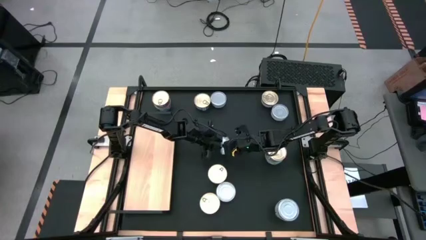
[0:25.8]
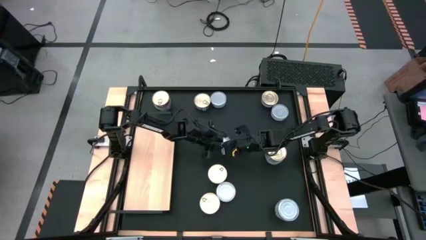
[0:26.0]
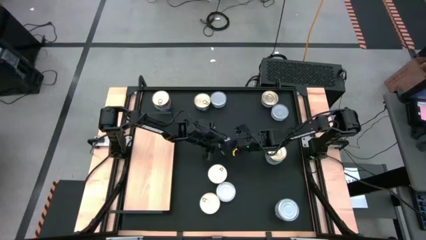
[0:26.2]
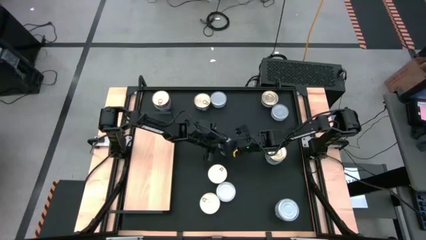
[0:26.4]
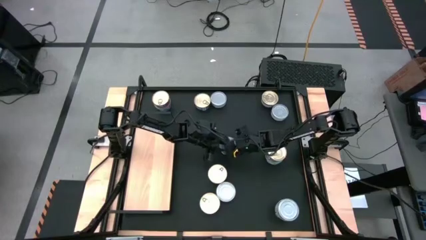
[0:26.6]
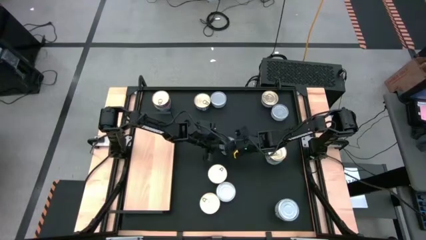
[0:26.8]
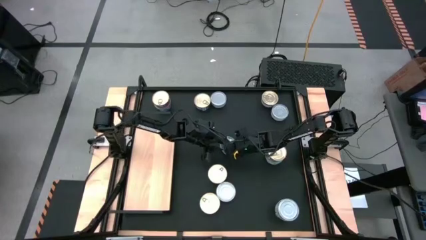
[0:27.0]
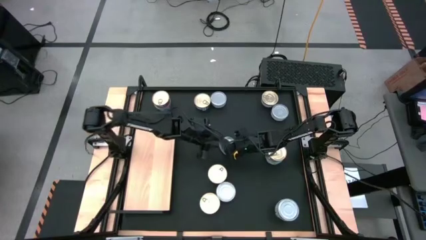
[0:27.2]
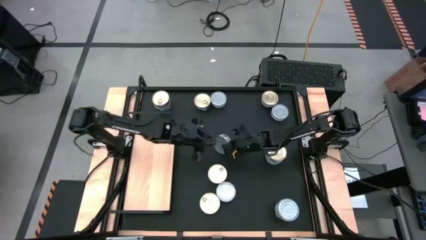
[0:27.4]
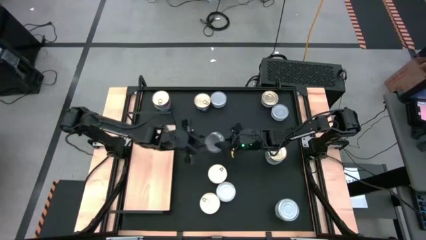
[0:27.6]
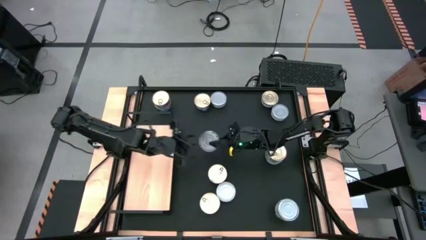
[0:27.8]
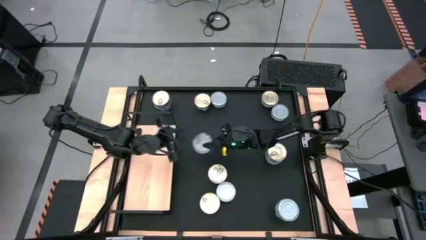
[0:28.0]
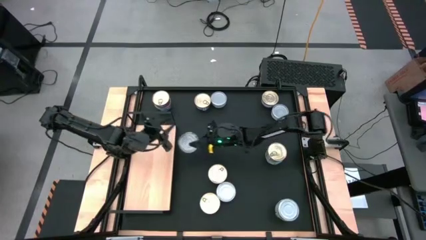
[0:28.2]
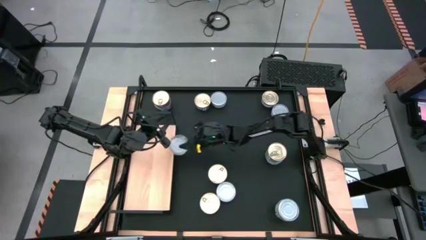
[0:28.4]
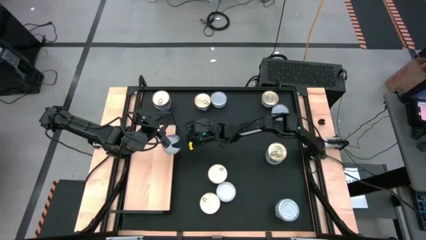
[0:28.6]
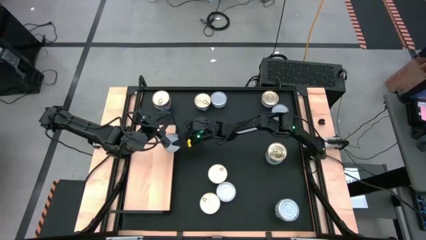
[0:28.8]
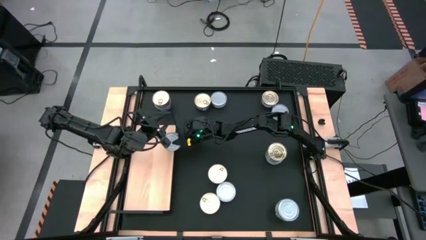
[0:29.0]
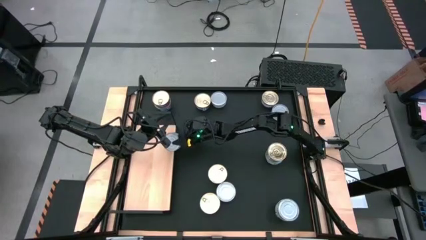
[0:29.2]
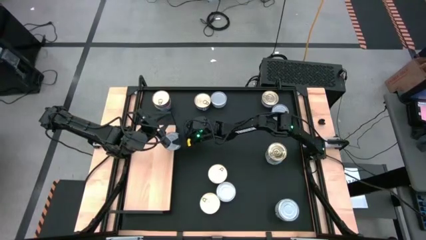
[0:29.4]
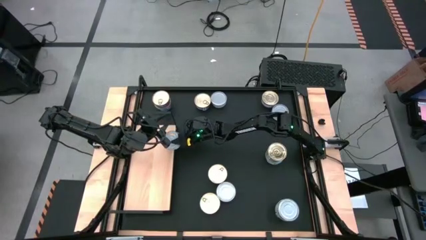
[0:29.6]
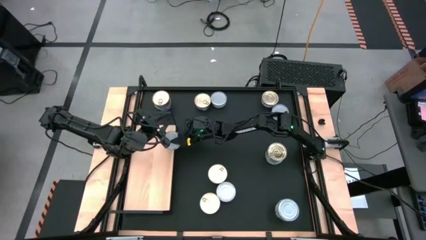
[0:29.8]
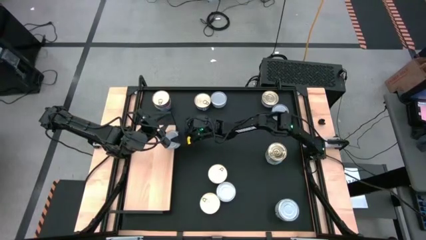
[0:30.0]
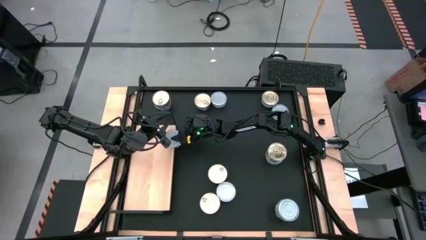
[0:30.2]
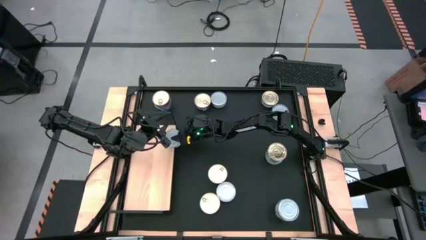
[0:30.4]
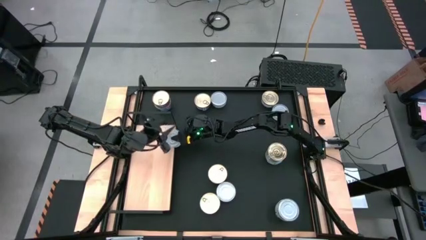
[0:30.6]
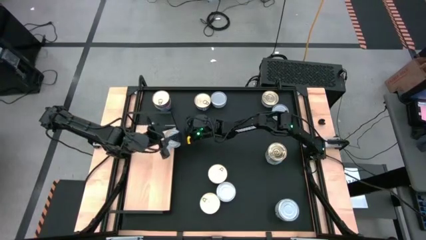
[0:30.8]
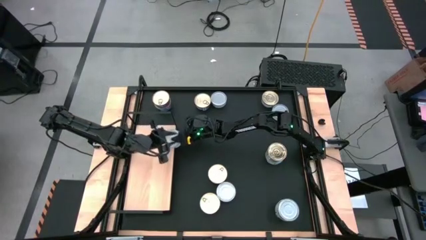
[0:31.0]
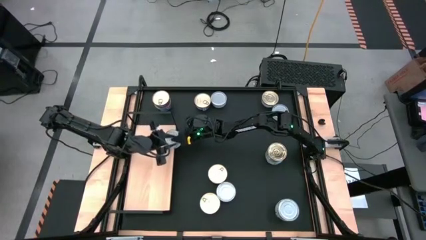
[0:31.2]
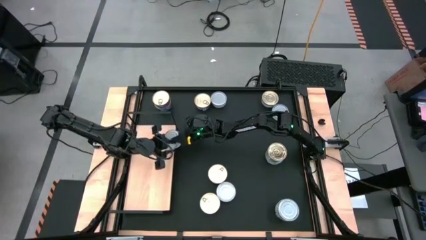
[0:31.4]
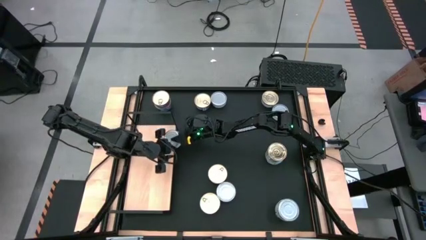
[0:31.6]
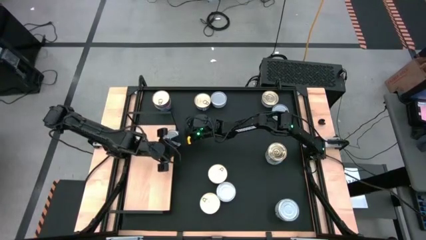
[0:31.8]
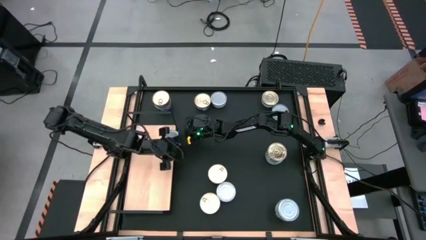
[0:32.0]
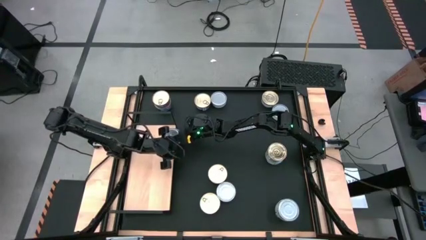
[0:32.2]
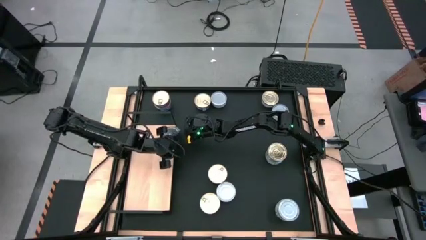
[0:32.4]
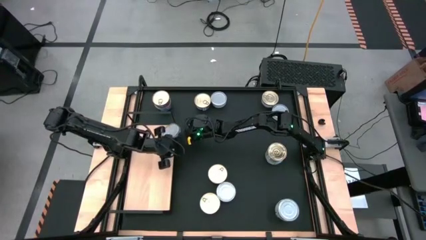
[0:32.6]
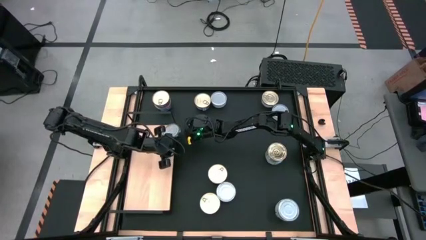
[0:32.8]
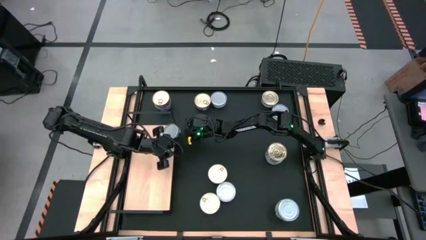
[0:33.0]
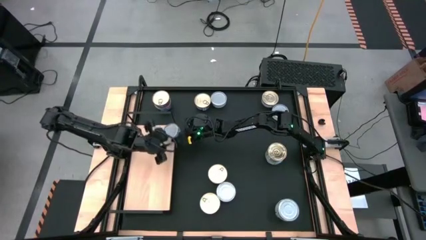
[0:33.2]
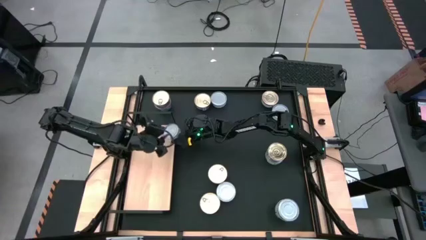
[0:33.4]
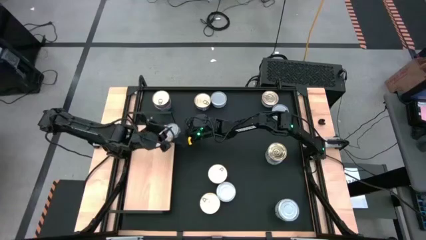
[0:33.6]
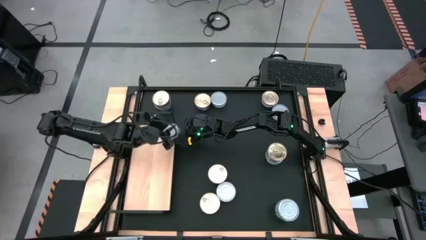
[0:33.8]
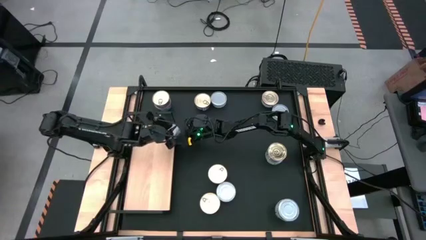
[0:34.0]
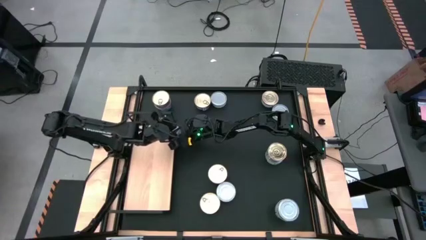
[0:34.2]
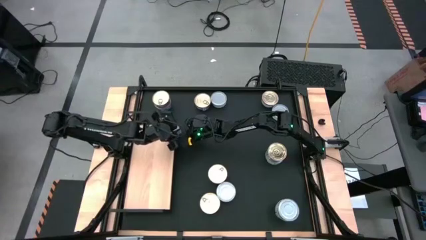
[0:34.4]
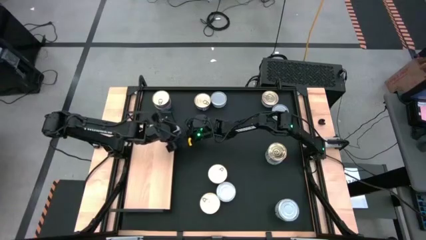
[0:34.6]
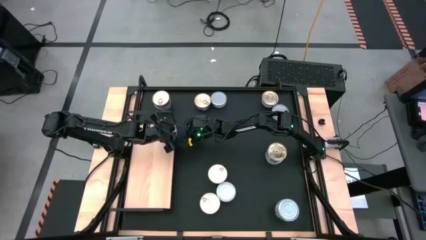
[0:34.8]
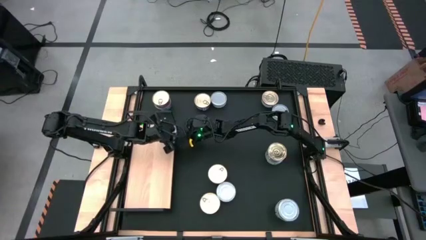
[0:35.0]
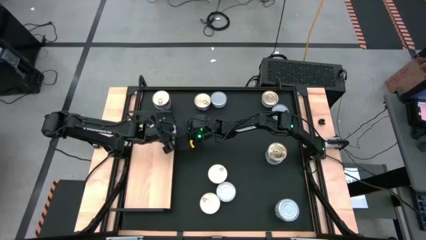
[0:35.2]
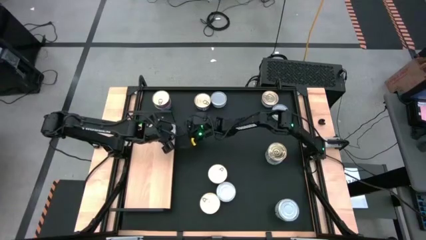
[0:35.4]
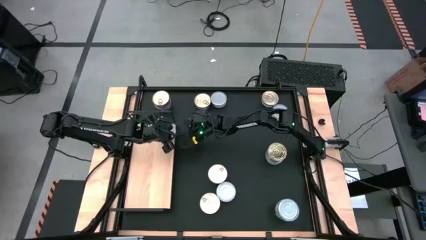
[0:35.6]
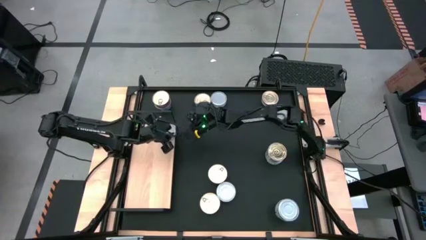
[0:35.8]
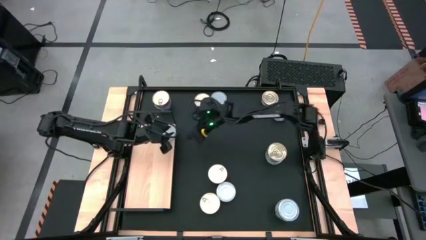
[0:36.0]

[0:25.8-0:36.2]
Task: Stack canned seafood by type on shelf
Put the green tuna can on the shelf

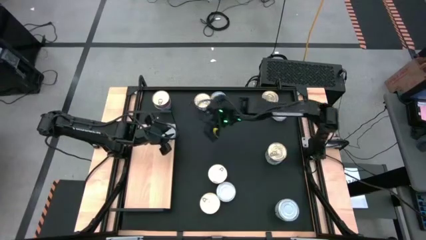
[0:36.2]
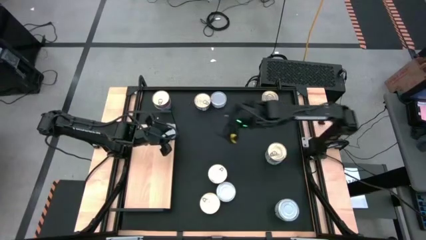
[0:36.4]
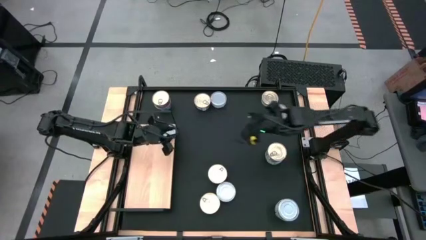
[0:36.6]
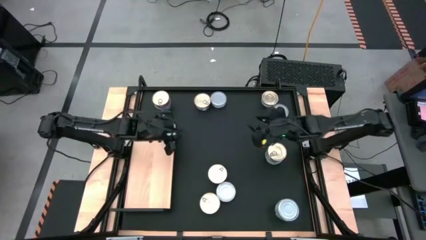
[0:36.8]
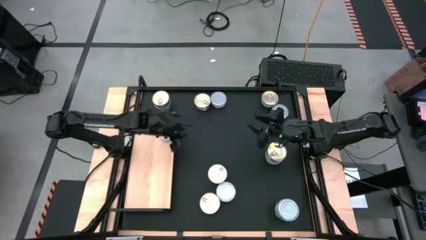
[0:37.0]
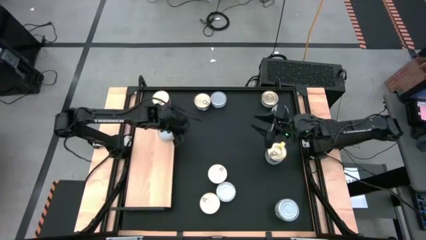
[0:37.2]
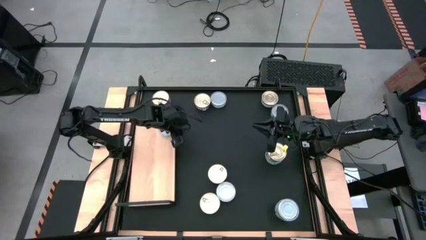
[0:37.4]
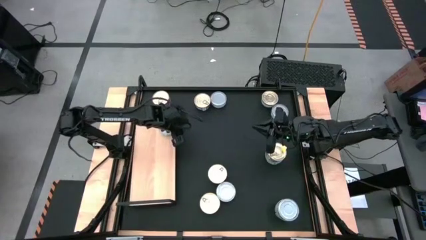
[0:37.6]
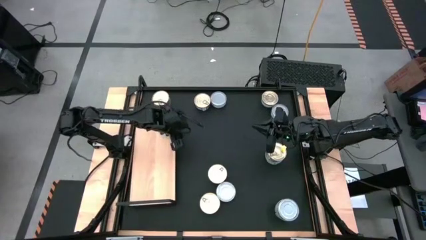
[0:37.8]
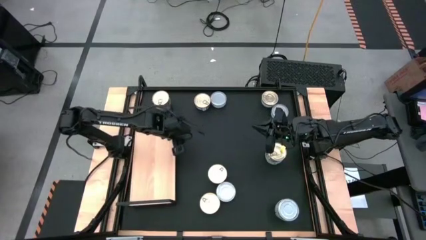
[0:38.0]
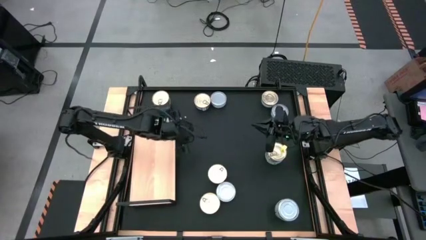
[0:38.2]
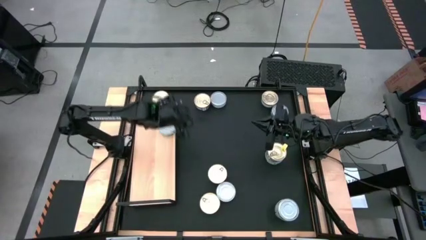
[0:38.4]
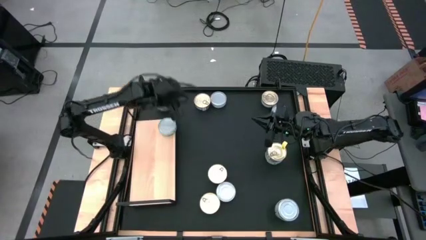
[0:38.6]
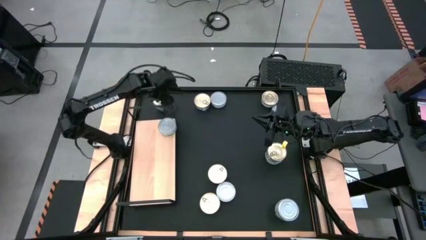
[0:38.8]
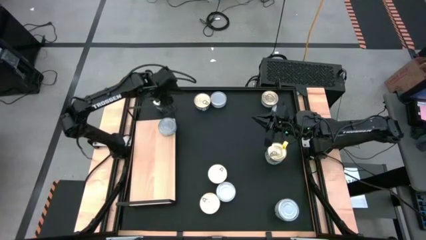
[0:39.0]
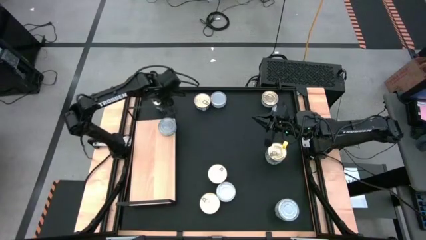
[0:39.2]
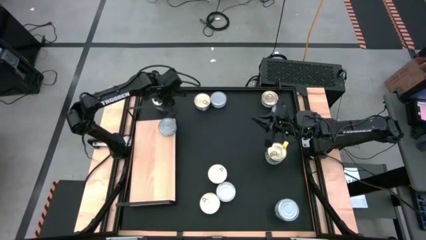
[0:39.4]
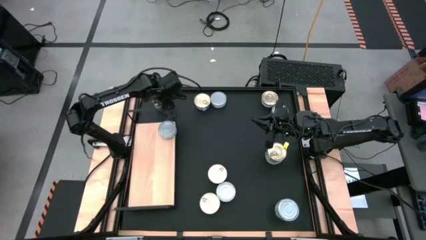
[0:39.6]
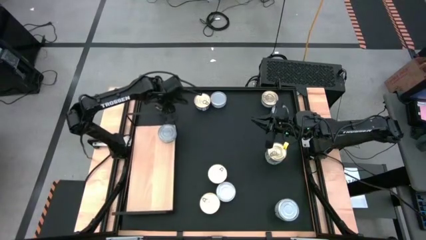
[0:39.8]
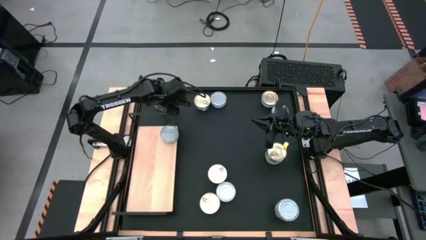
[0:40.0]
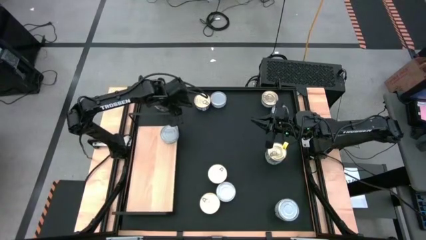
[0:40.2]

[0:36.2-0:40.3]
Adjust the shelf

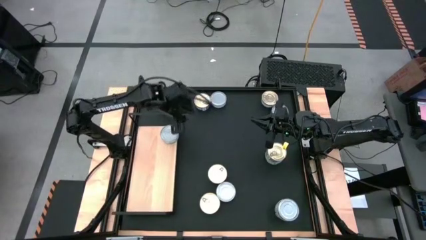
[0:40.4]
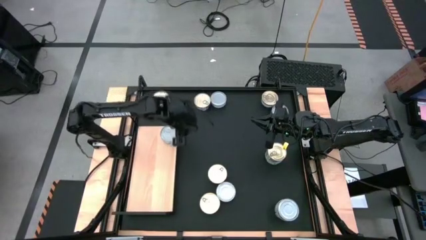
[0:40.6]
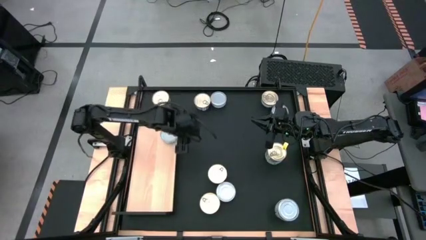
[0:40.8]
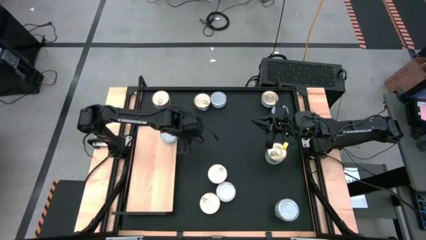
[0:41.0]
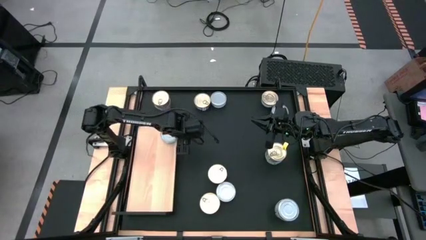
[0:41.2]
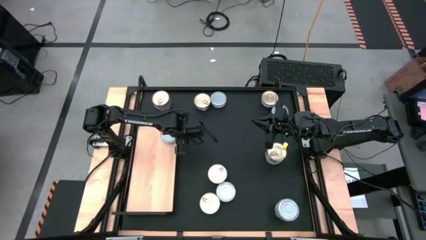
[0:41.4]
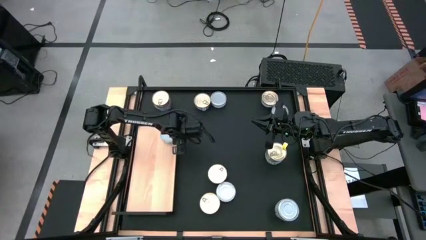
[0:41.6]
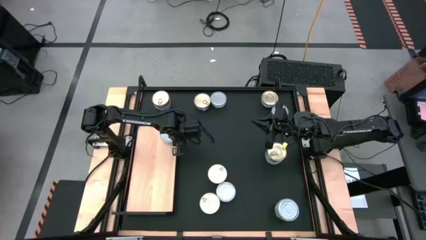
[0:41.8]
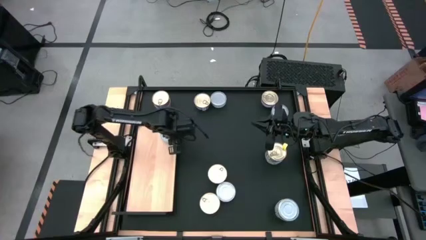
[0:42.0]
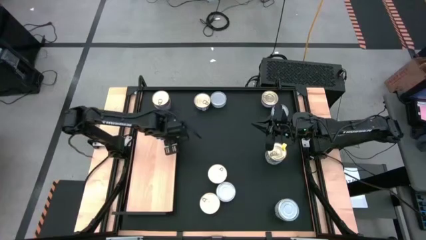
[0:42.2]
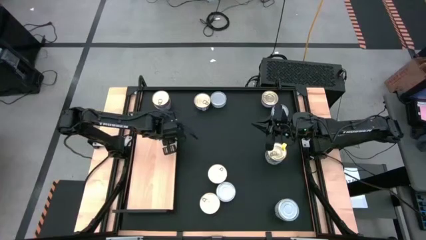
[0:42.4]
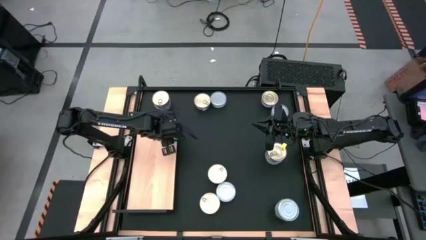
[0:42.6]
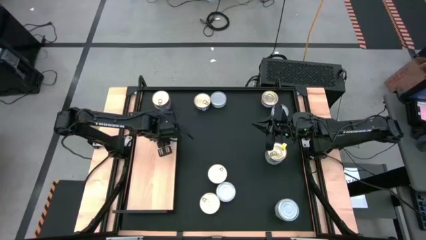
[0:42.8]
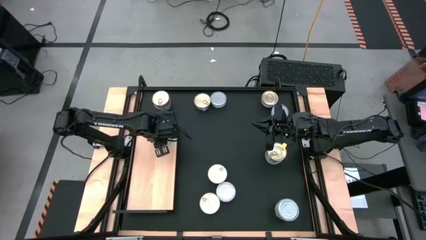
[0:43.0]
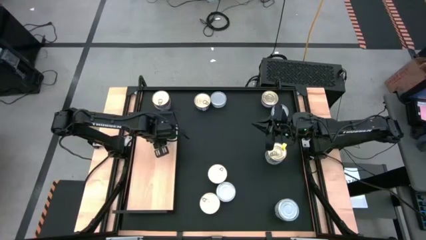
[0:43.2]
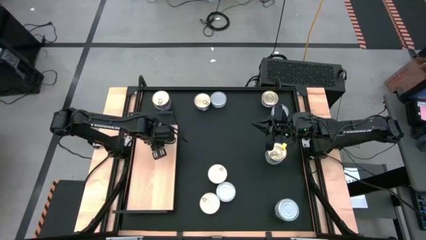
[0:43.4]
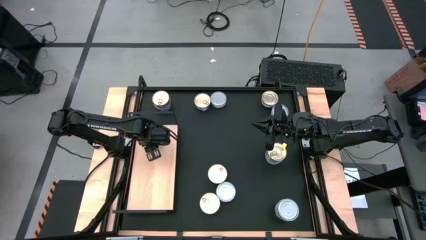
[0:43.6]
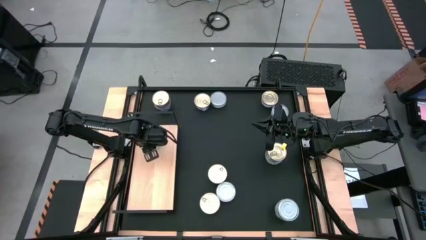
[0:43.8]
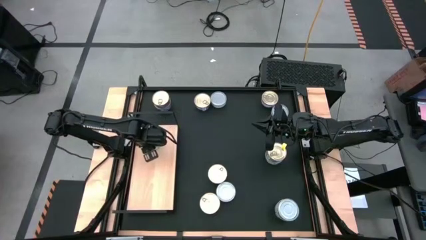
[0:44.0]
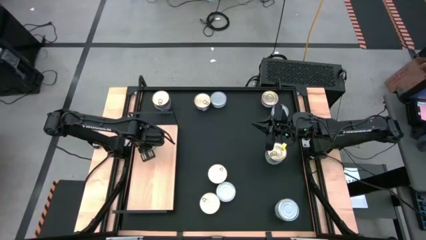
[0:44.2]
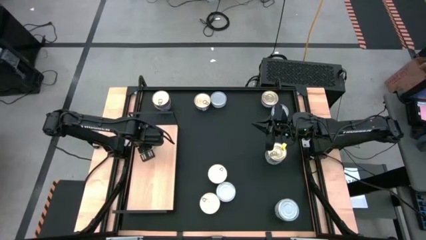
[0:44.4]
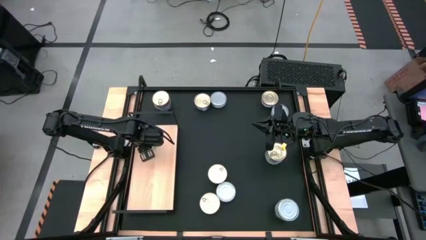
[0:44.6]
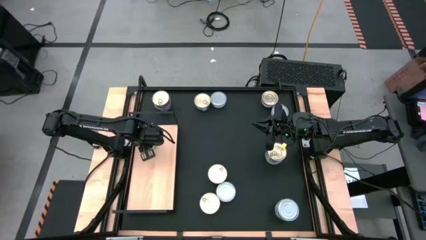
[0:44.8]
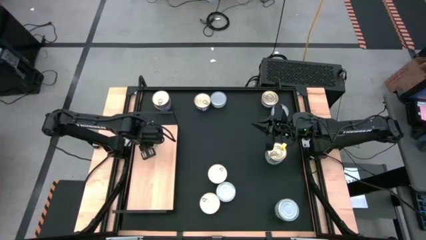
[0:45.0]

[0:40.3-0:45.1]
Adjust the green tuna can
